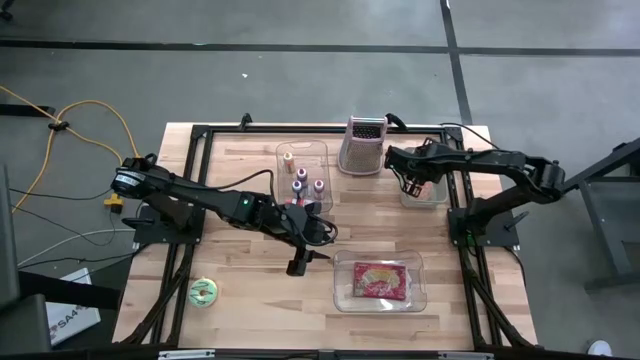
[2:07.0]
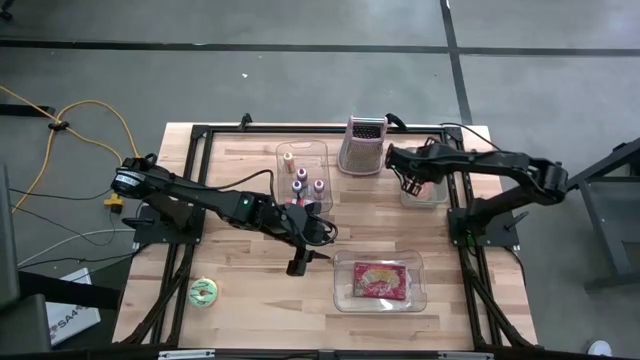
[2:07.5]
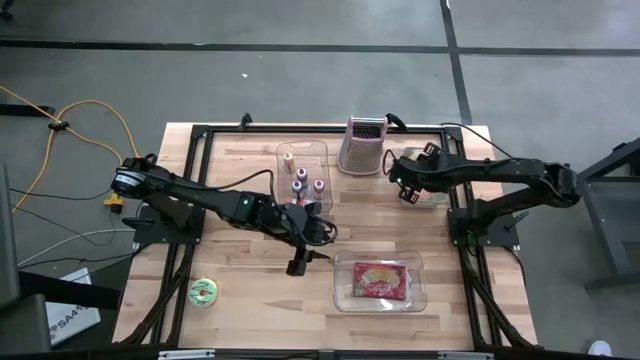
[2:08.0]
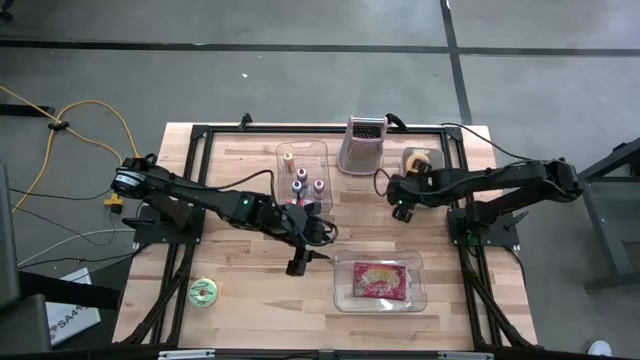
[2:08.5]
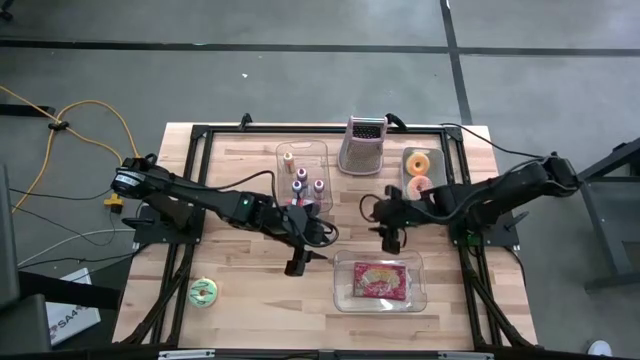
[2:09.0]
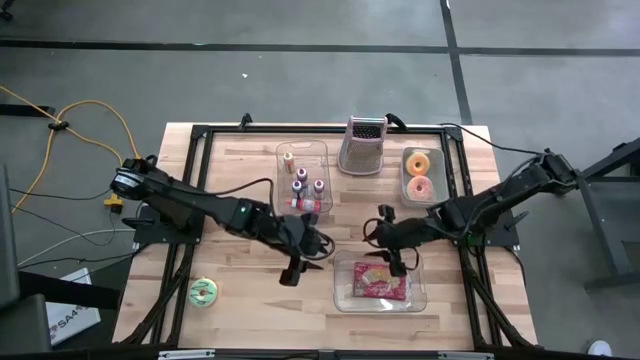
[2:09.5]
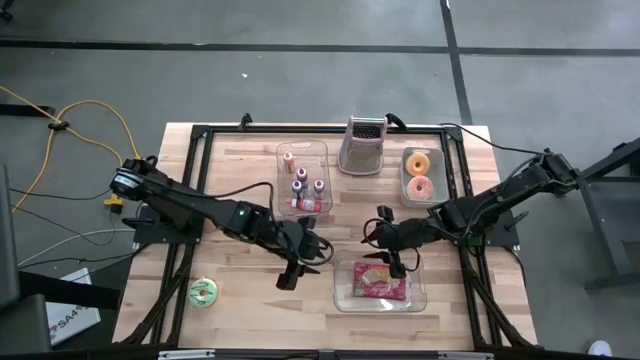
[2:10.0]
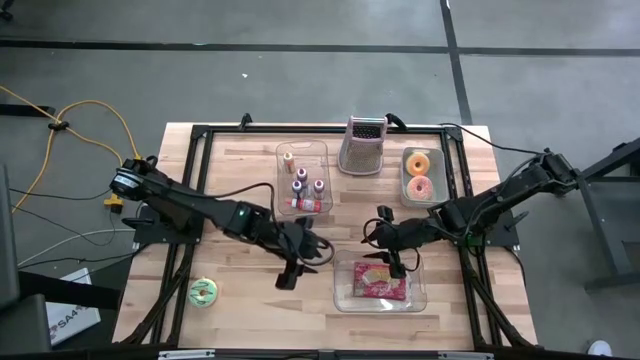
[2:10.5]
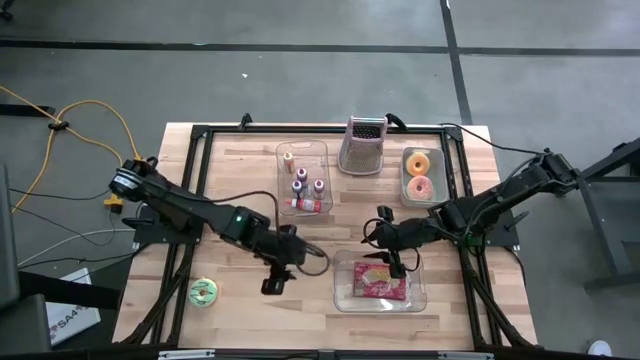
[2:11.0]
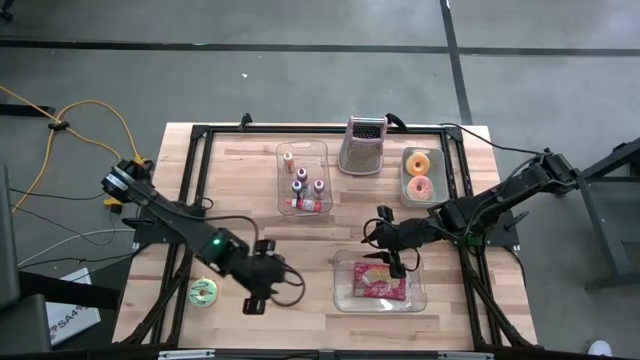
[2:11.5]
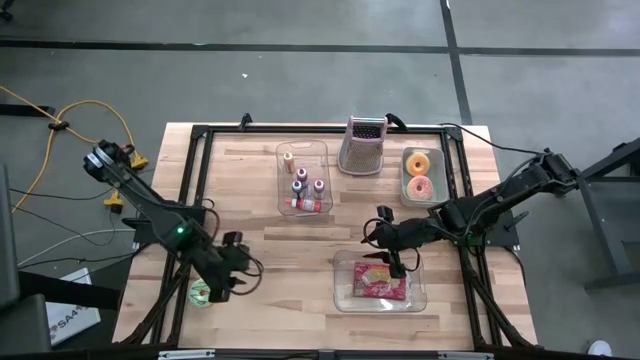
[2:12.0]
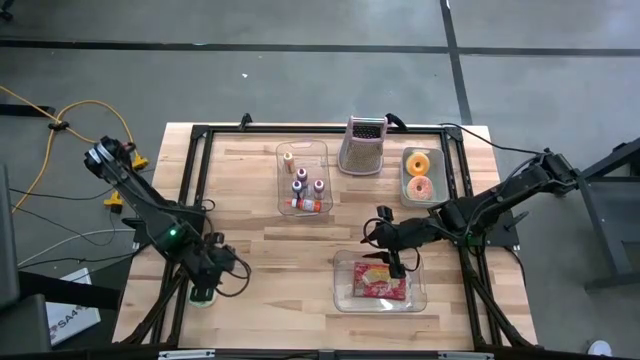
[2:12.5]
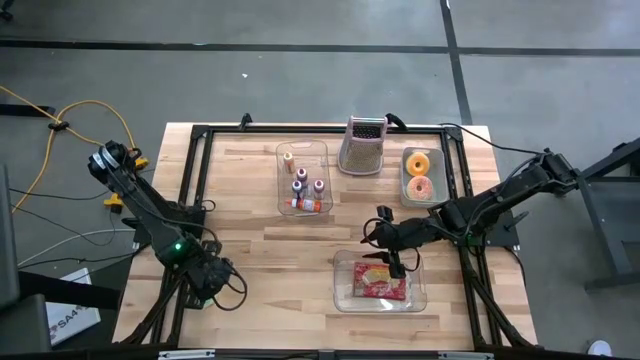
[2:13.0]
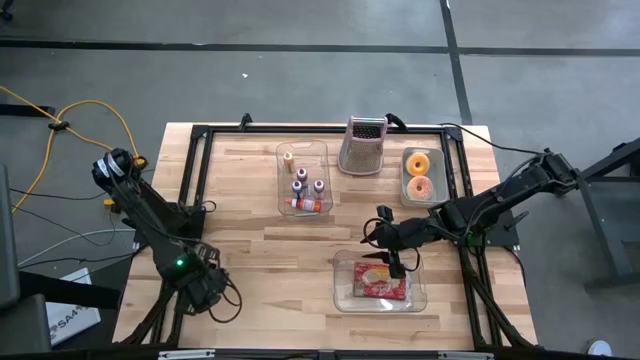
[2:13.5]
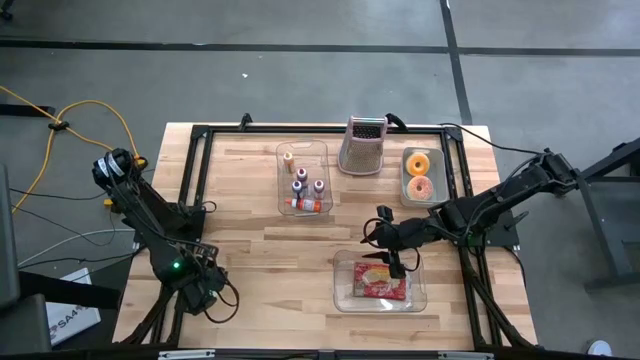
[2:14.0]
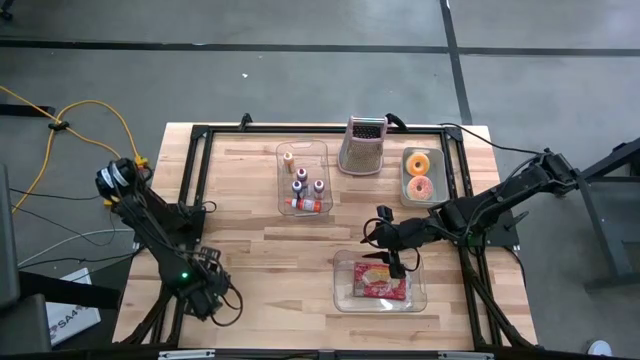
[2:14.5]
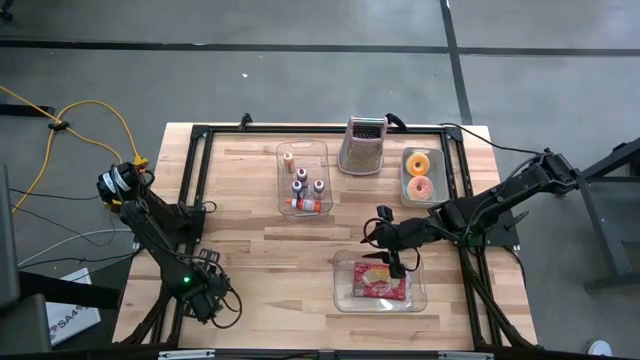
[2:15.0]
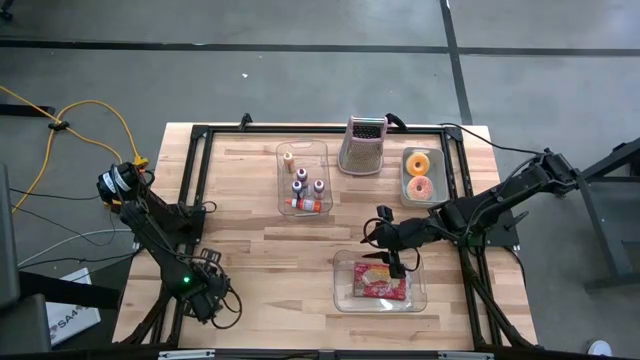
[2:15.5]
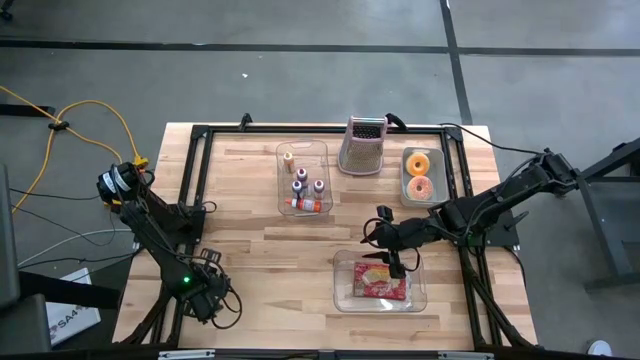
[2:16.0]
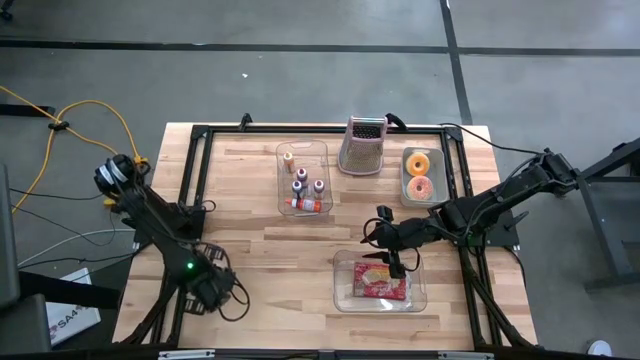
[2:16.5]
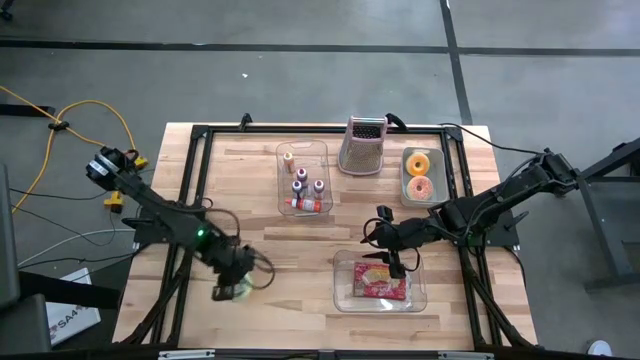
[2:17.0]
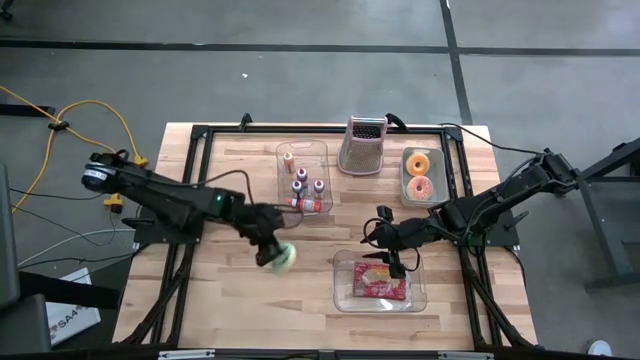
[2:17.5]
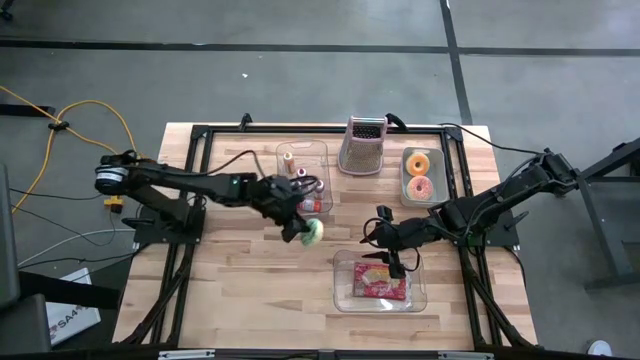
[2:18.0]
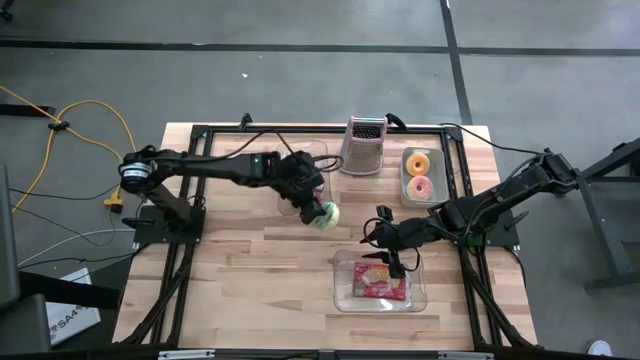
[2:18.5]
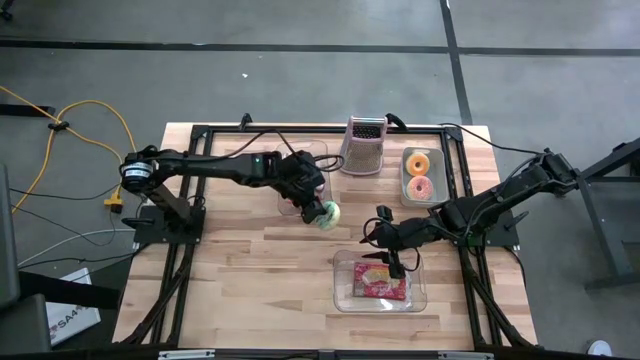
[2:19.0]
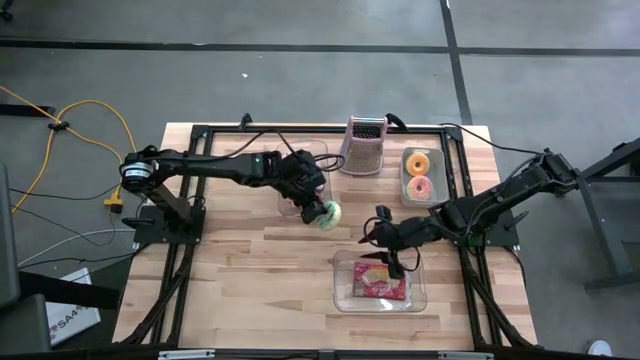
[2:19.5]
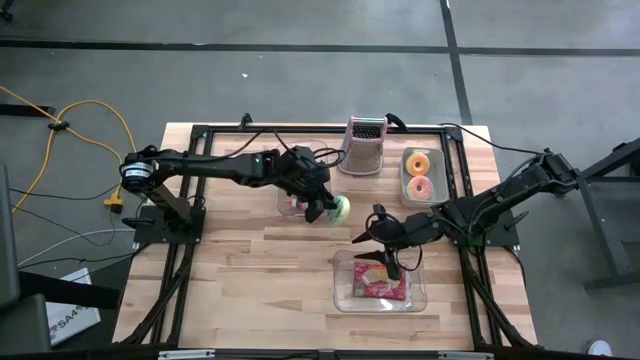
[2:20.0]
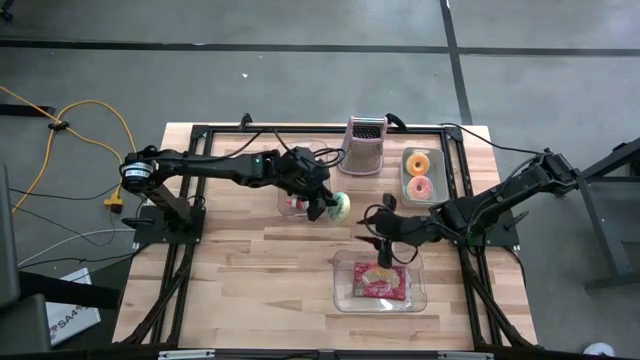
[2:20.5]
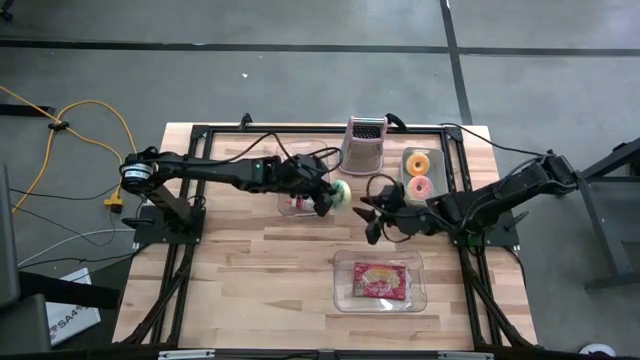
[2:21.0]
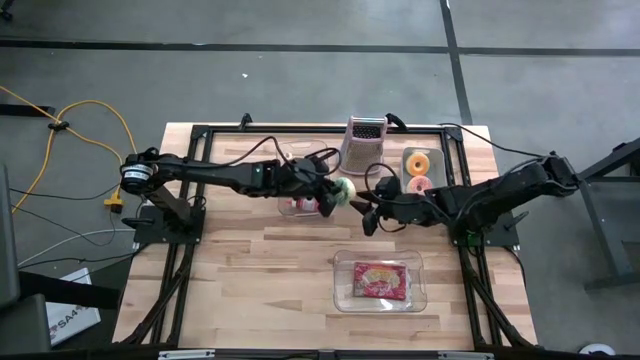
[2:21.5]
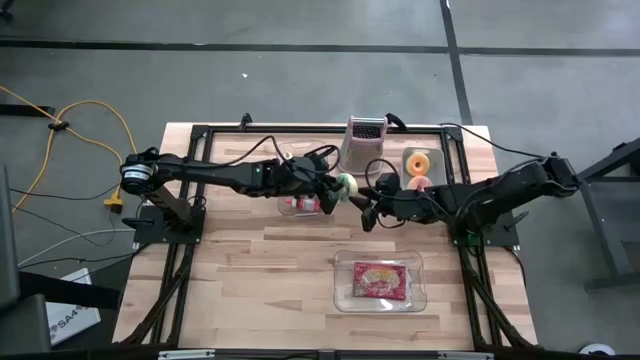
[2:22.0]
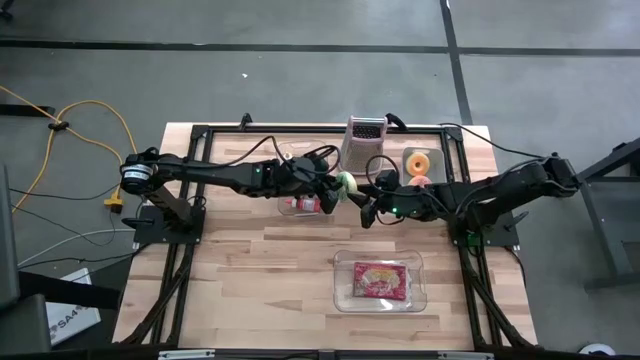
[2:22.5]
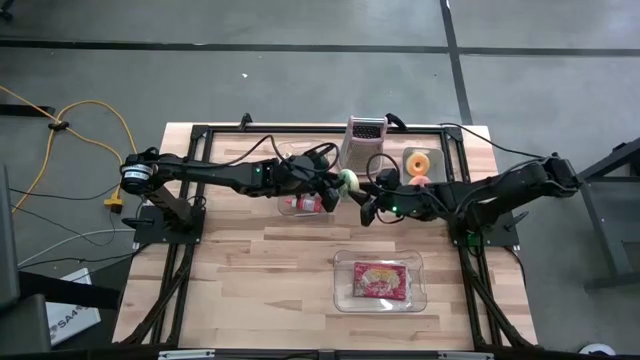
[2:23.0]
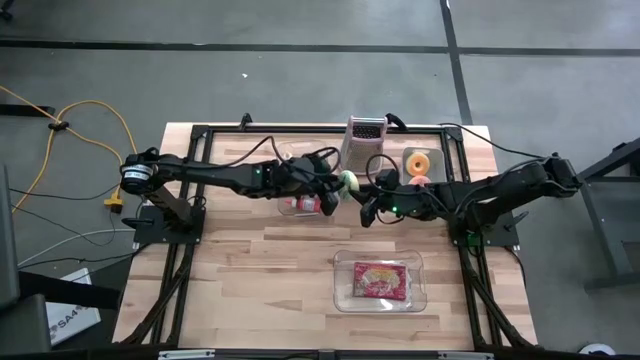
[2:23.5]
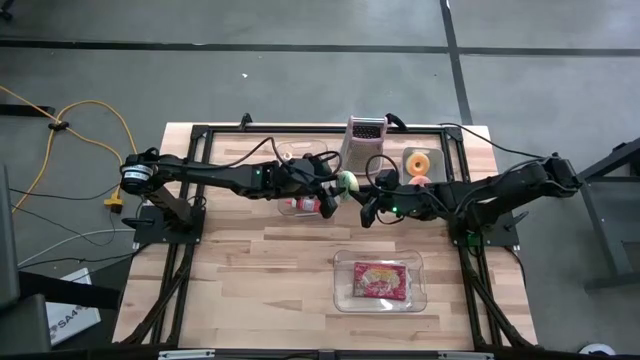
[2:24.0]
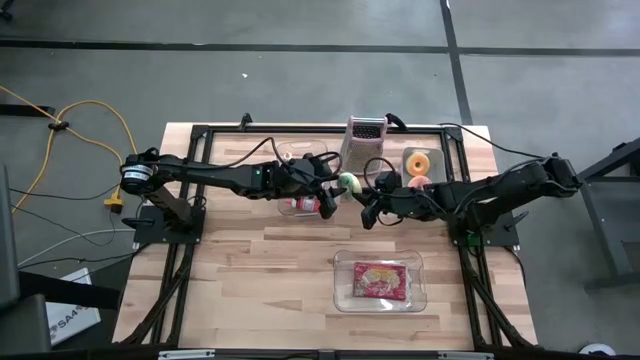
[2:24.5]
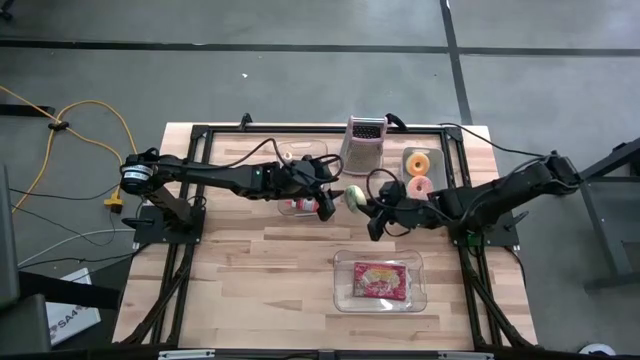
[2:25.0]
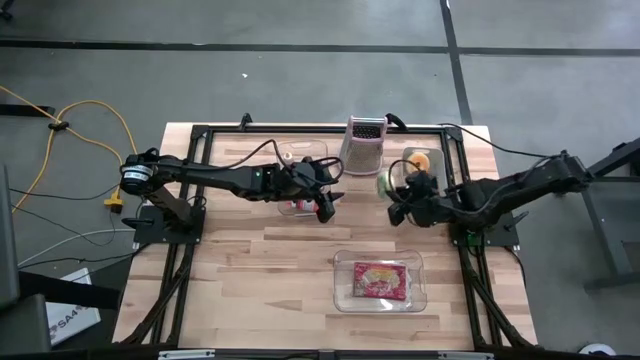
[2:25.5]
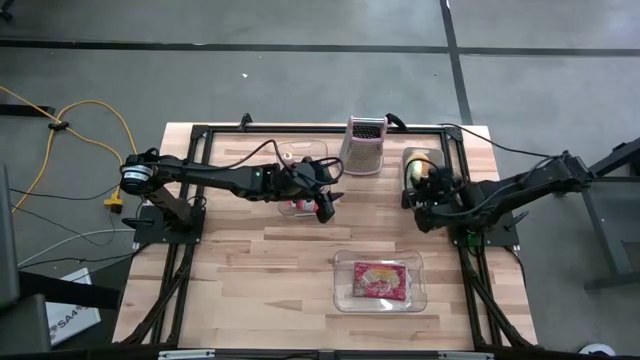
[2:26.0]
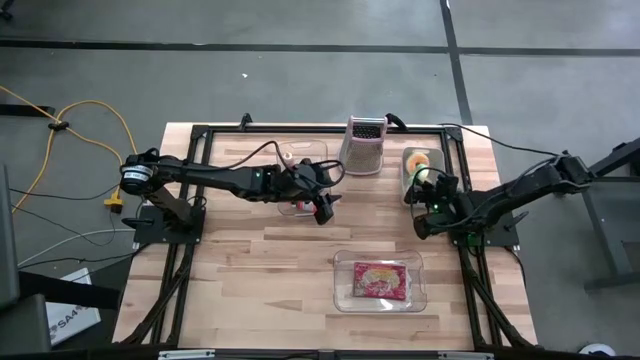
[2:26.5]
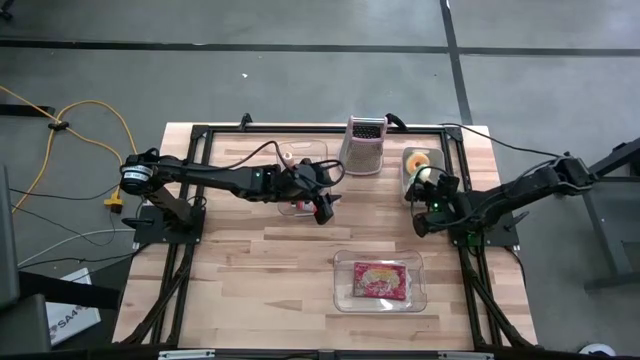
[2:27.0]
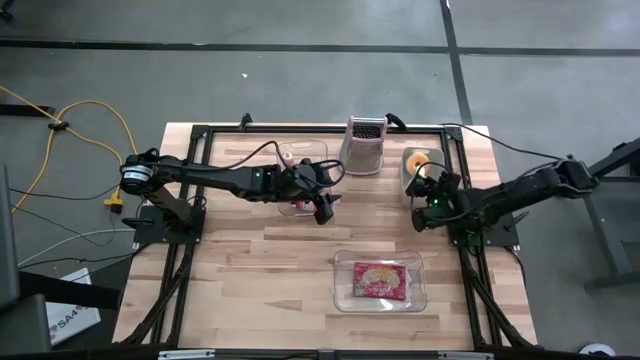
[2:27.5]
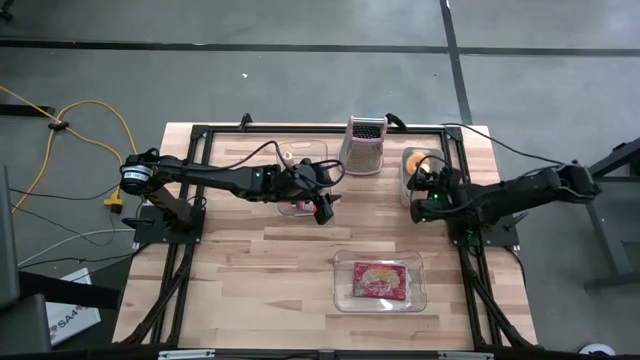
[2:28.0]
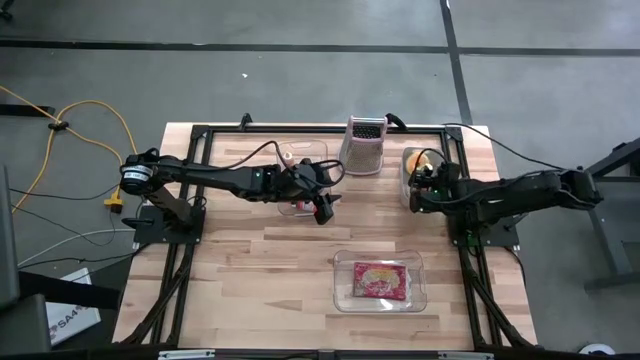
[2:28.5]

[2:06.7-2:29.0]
Put the blue donut into the gray bin
